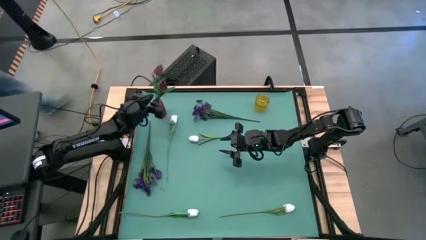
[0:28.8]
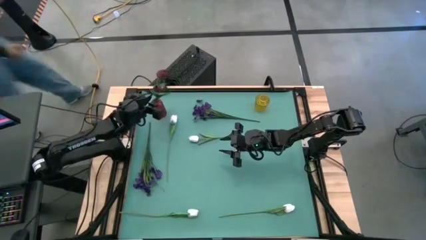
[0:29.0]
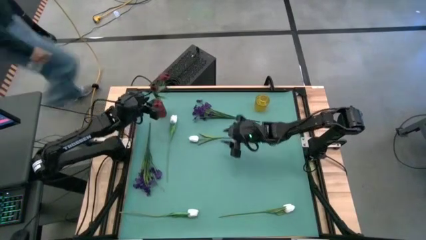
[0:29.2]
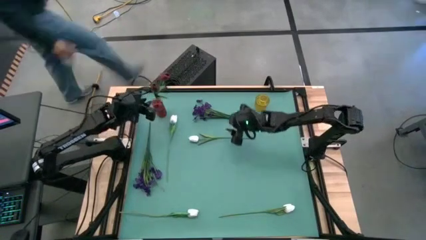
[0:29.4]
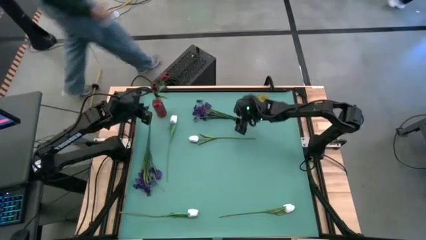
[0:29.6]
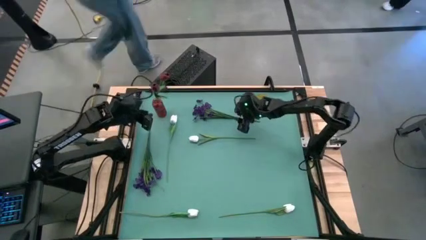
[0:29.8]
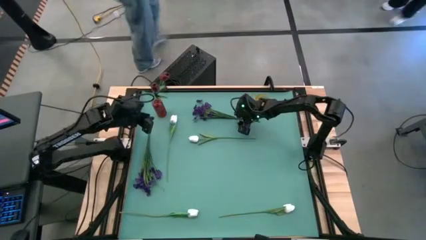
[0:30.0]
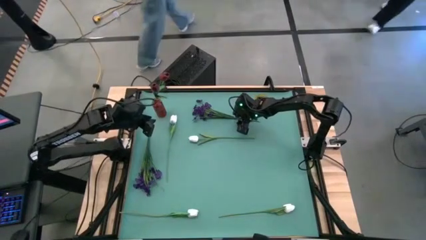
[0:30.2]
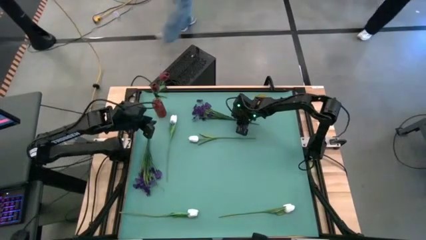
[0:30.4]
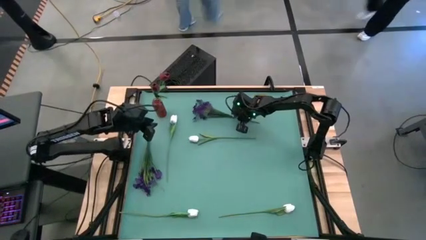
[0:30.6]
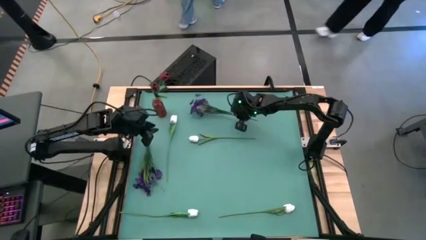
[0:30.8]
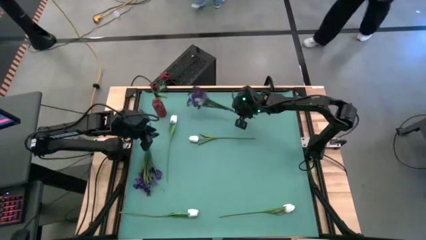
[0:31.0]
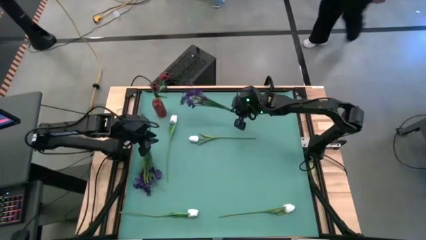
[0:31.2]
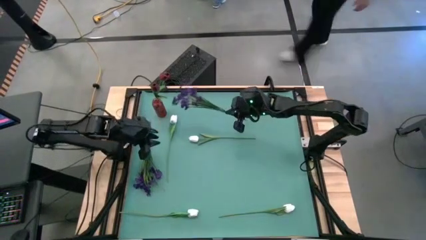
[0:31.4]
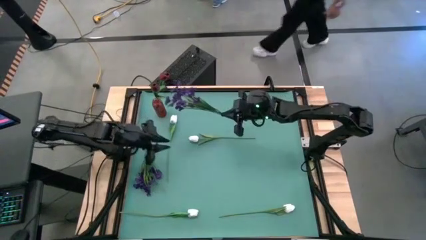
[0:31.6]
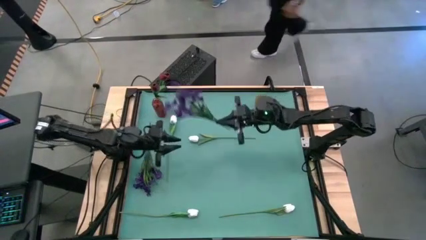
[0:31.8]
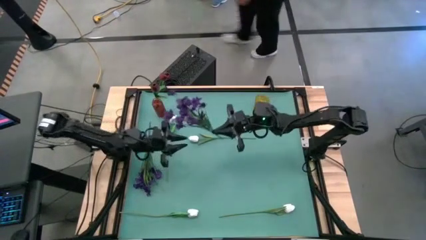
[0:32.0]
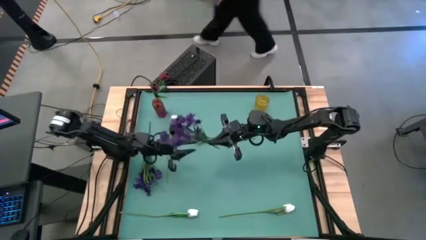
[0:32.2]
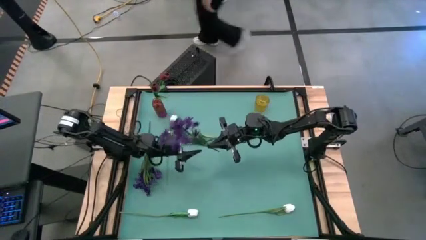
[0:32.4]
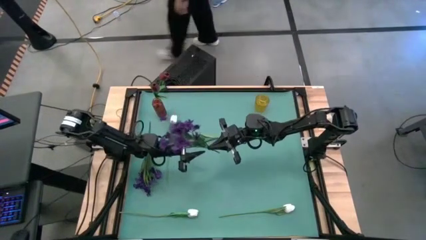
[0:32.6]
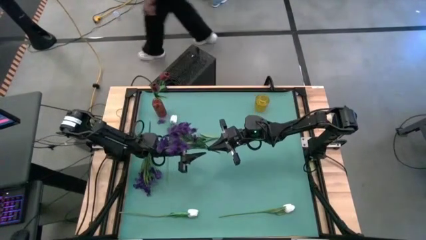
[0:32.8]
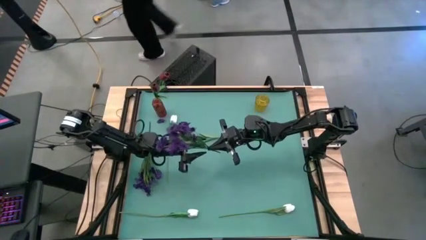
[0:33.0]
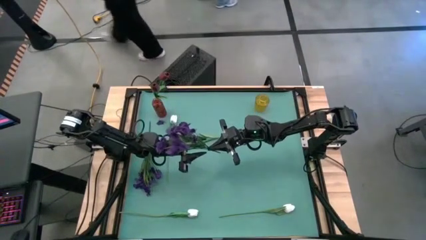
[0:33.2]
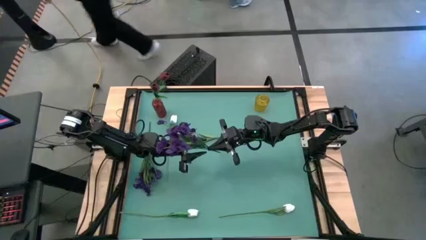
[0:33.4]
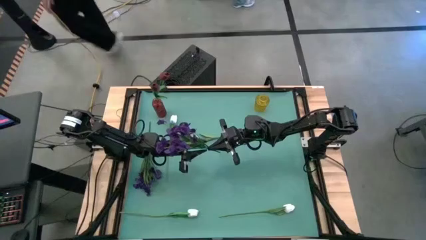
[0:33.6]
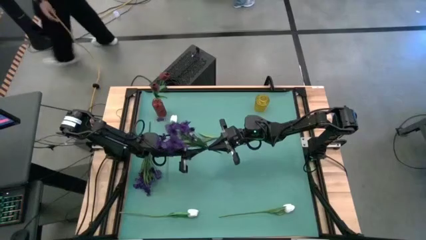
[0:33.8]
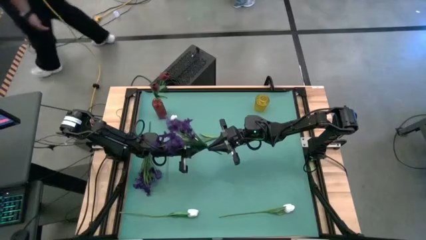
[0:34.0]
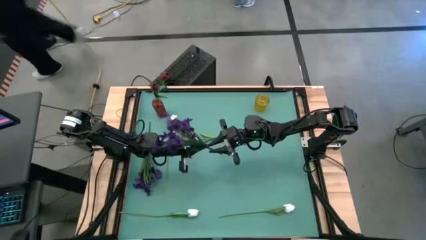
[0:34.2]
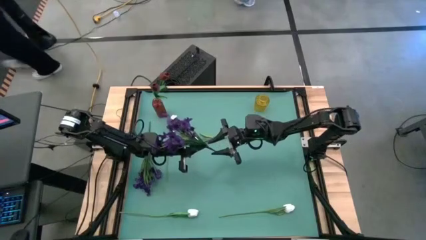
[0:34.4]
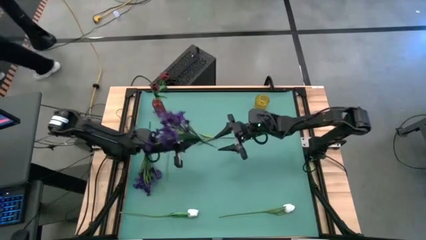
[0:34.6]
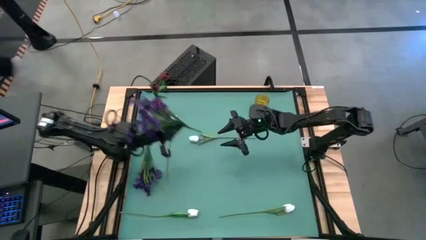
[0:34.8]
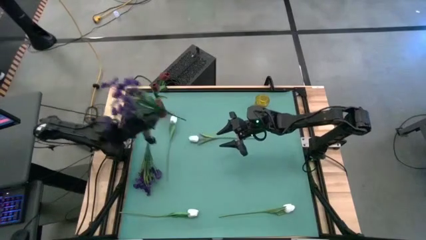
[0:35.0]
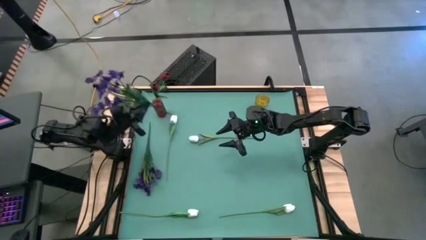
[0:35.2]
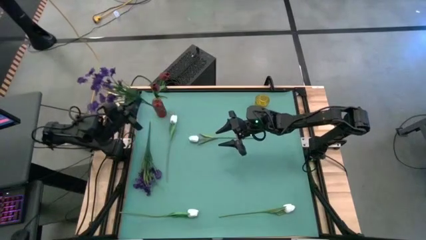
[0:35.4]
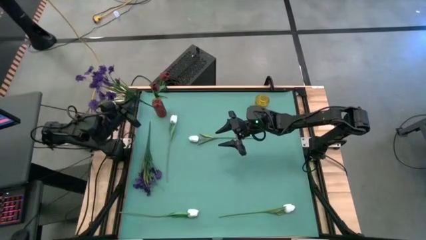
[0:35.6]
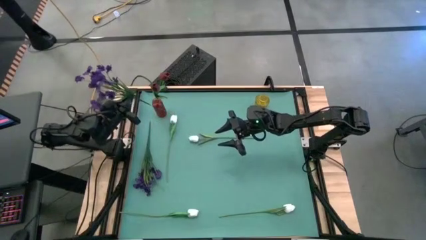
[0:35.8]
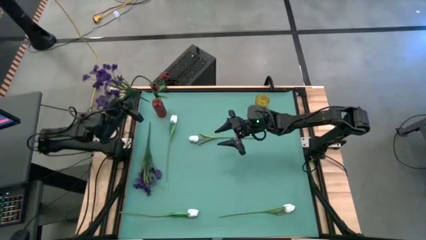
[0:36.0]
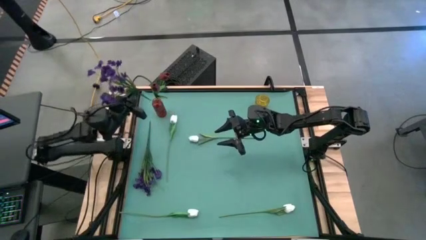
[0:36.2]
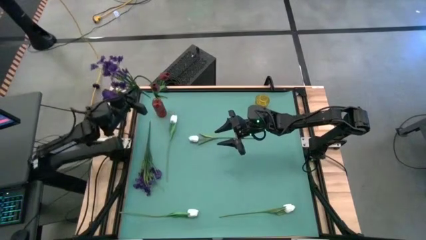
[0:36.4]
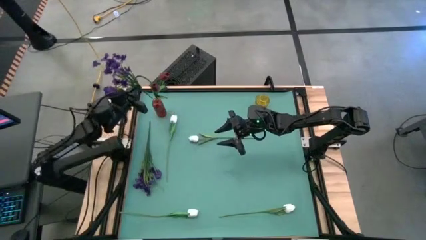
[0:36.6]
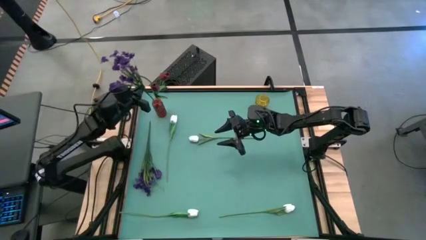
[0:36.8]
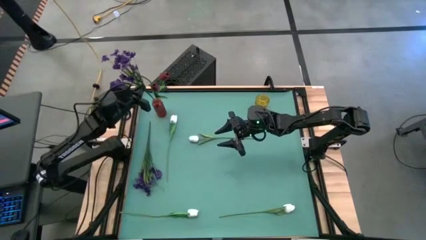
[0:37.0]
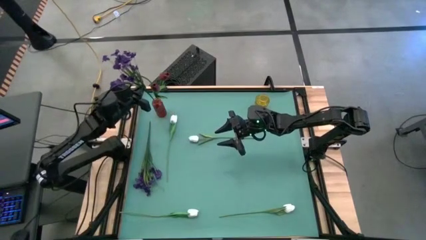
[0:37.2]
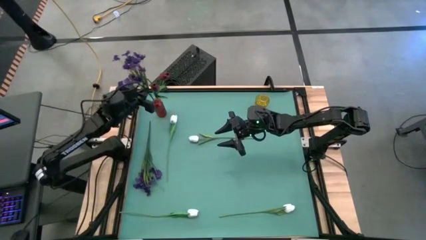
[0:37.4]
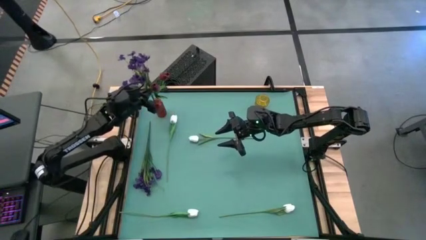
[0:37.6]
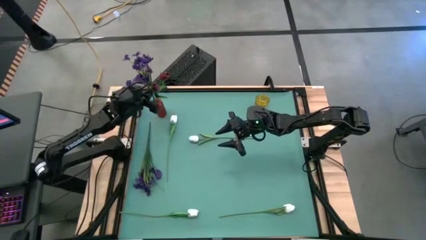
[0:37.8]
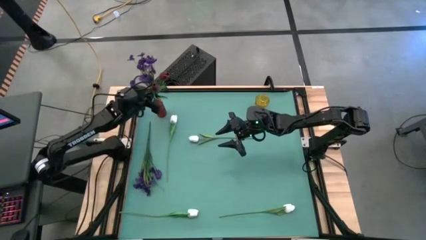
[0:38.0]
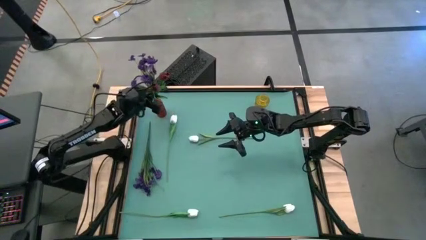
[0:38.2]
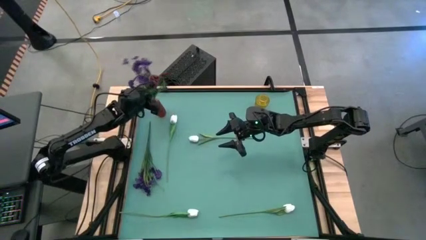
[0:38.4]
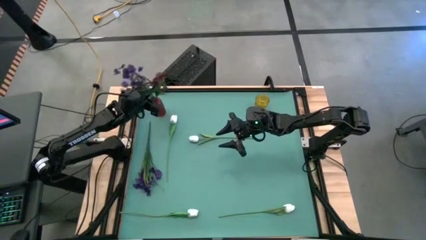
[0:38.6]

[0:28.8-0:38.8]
Task: Sort flowers into vase by color
Put the top violet flowers into the red vase

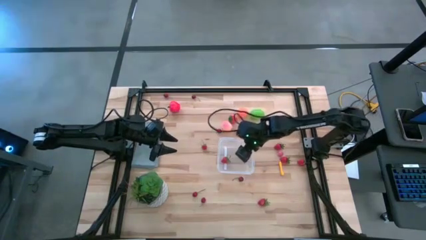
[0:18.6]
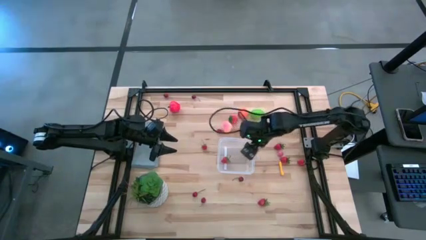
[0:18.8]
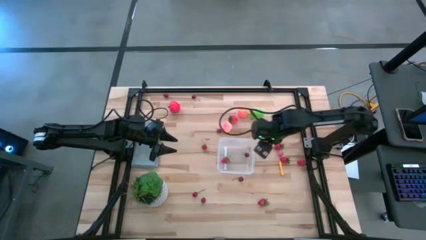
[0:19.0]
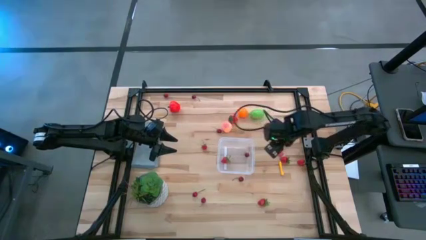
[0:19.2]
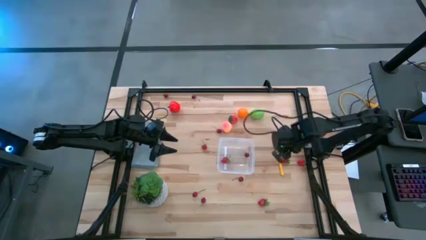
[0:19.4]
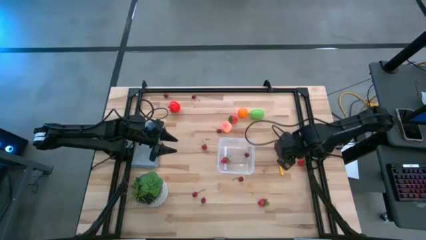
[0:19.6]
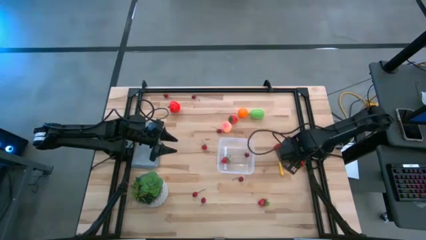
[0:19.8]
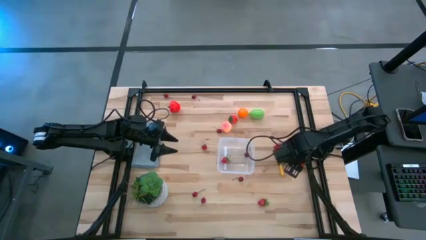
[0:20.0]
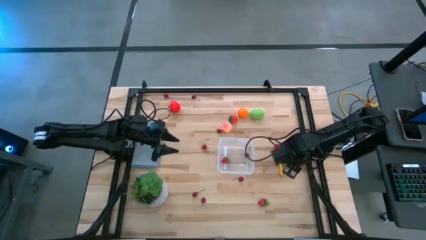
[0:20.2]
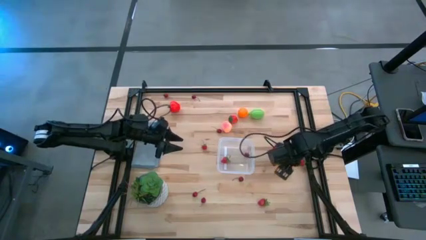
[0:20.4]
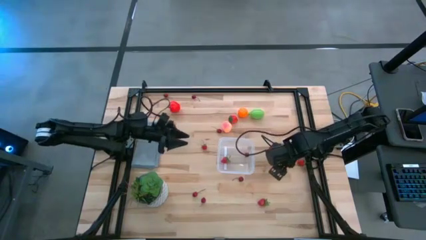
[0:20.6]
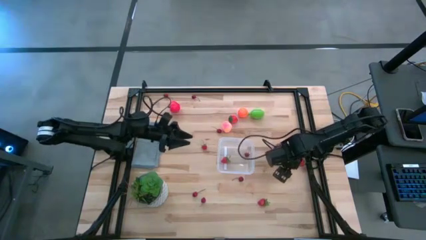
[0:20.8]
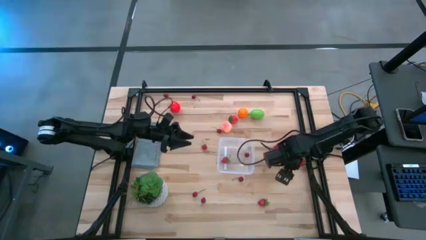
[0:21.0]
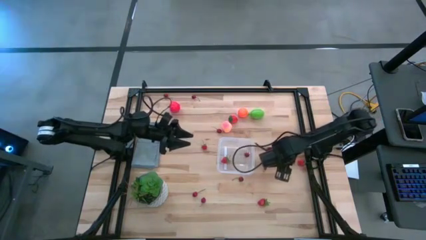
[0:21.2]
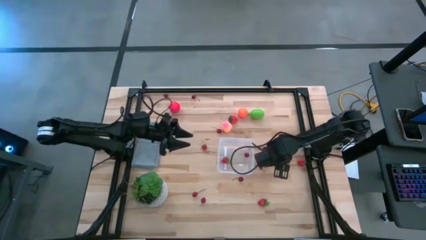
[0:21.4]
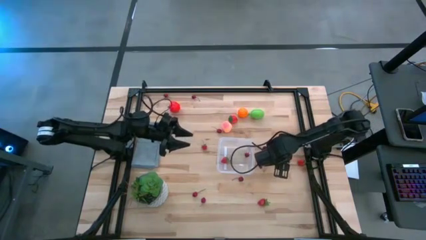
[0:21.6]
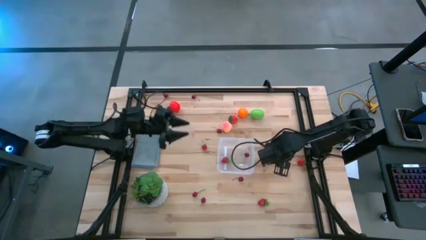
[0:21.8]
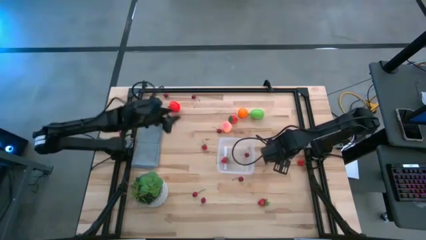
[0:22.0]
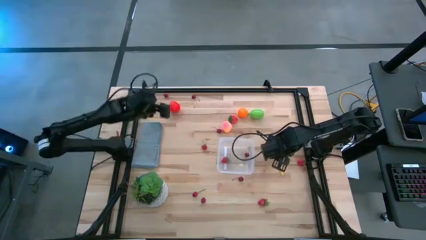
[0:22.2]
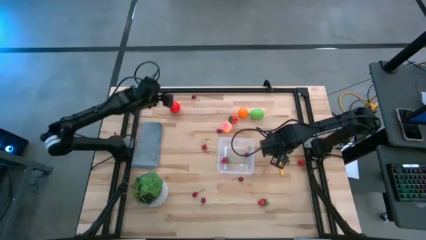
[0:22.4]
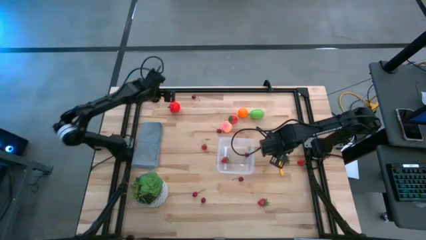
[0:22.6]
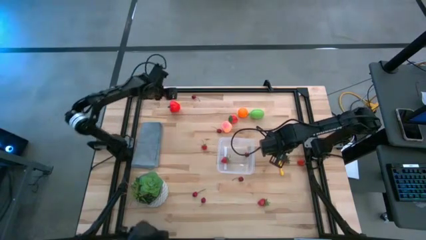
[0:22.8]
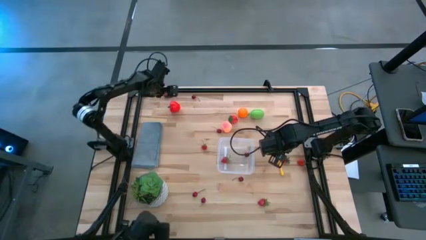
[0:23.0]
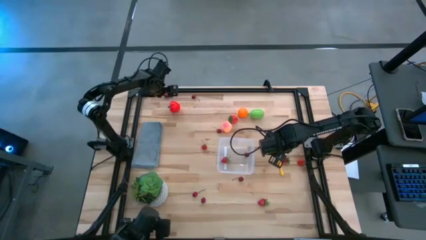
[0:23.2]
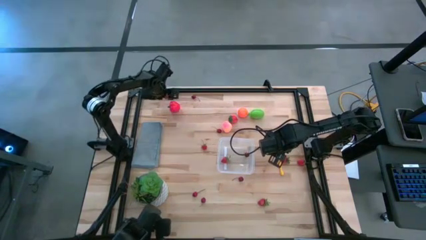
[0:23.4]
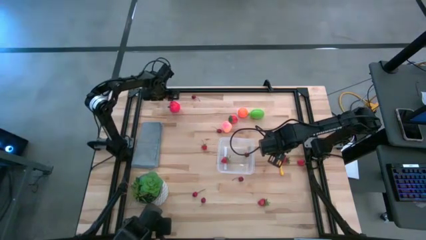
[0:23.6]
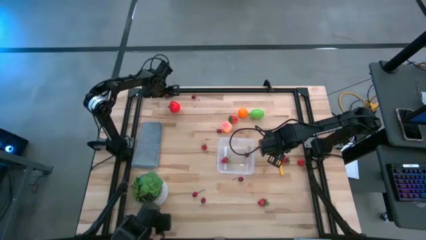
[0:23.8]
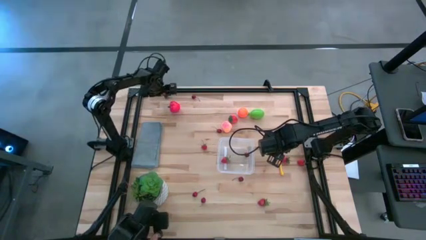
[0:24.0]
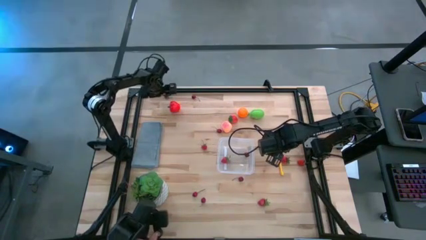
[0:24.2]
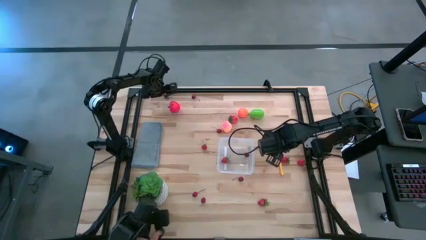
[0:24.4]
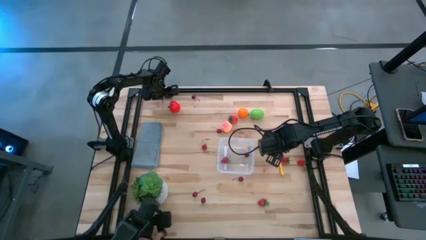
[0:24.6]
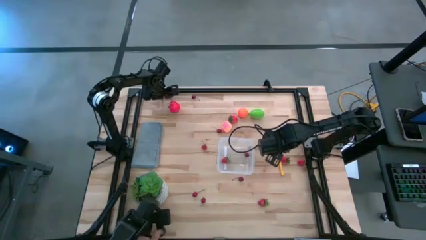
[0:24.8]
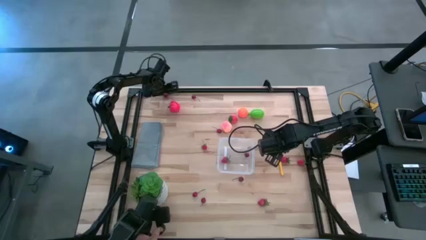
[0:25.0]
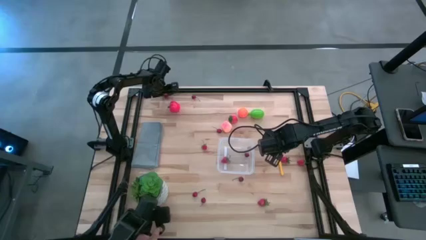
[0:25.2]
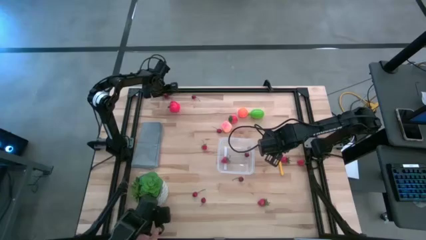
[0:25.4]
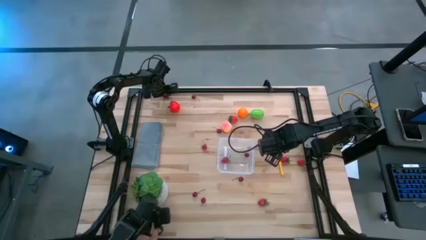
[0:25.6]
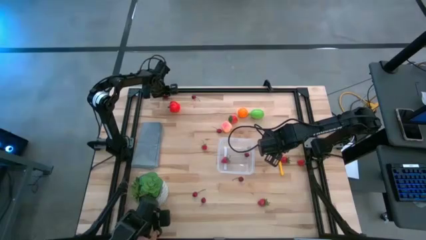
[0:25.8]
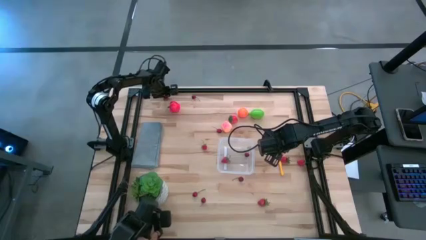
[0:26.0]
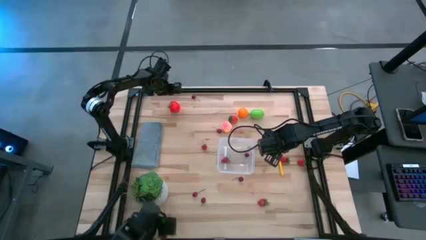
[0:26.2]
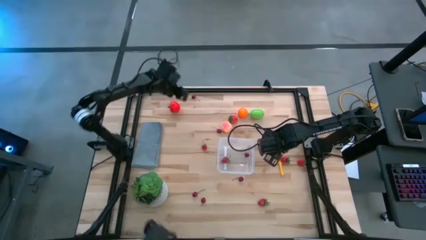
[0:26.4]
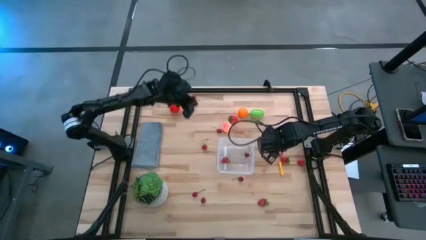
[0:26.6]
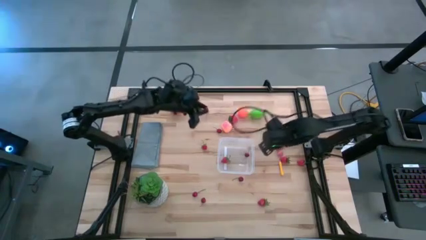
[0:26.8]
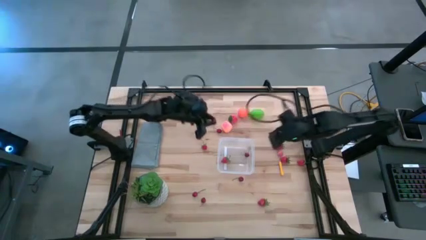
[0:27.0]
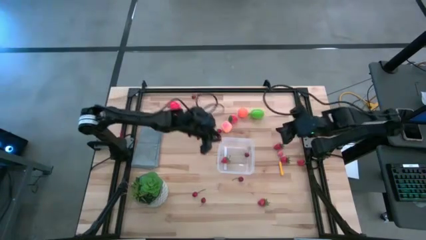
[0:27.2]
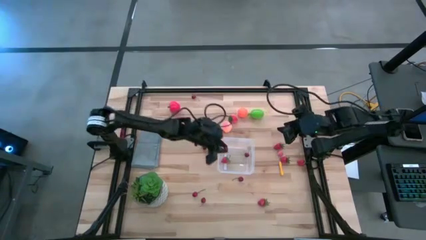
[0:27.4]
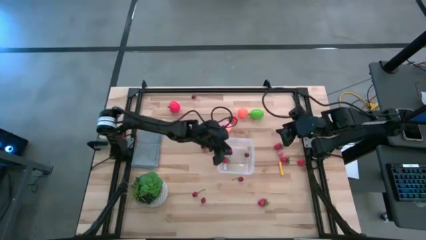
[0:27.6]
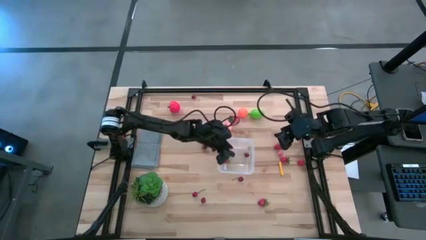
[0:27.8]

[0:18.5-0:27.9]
Task: Pick and placing Produce into tupperware
Put the cherry into the transparent bin
